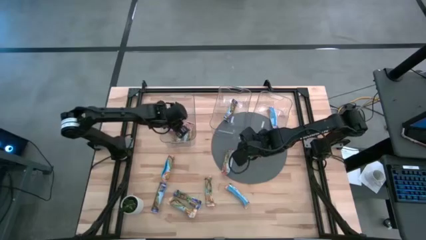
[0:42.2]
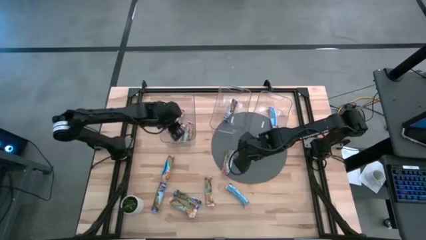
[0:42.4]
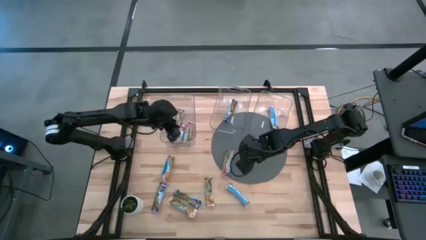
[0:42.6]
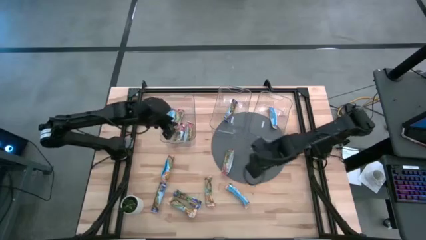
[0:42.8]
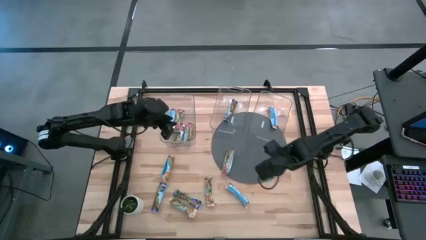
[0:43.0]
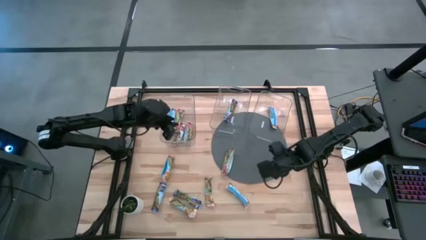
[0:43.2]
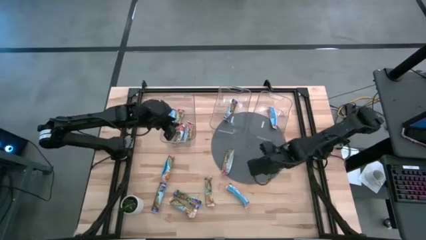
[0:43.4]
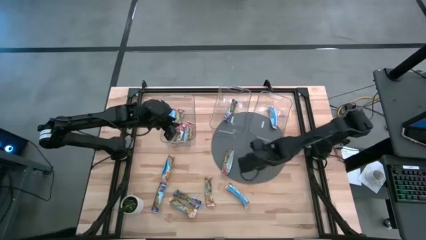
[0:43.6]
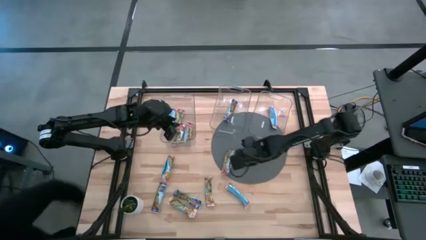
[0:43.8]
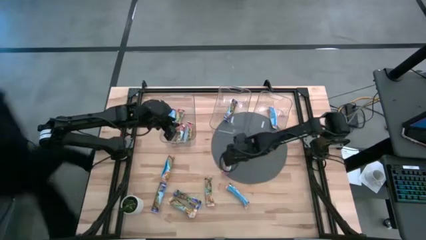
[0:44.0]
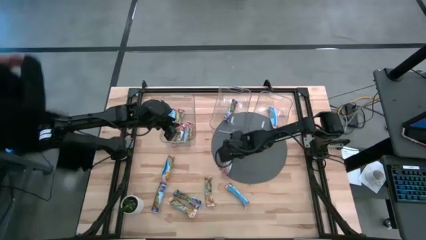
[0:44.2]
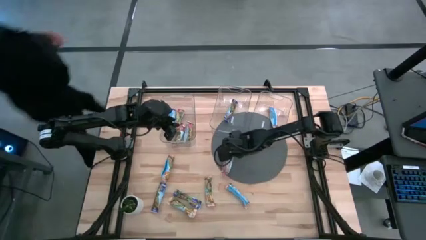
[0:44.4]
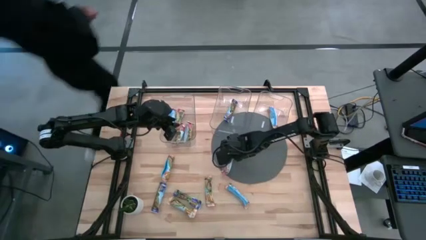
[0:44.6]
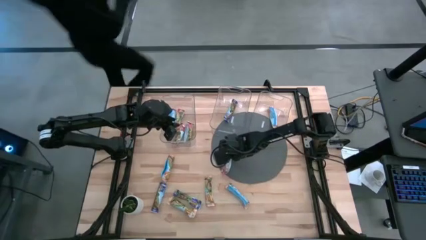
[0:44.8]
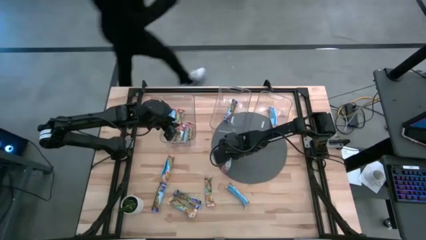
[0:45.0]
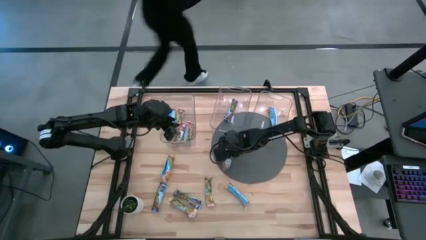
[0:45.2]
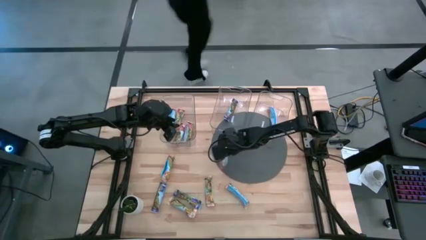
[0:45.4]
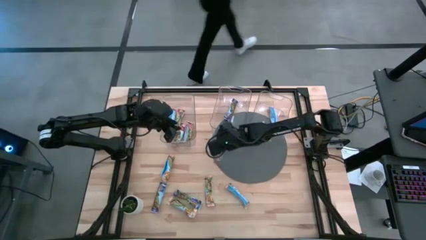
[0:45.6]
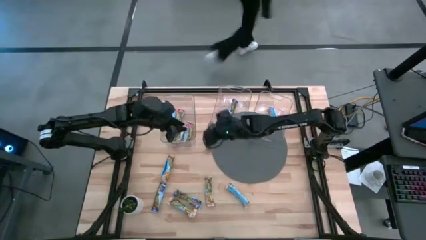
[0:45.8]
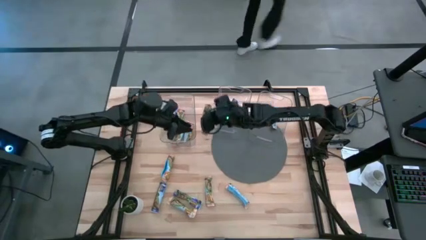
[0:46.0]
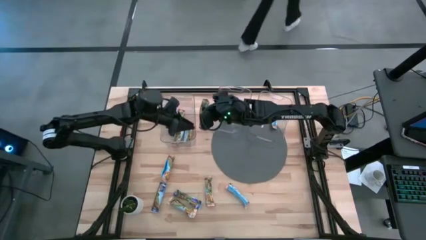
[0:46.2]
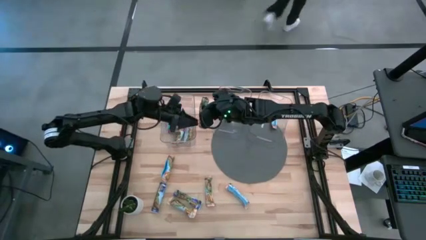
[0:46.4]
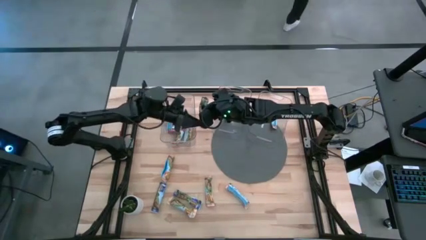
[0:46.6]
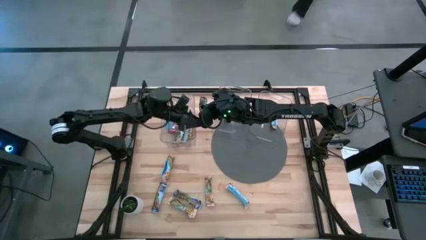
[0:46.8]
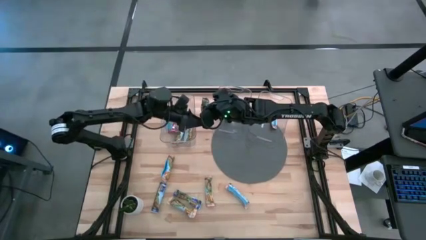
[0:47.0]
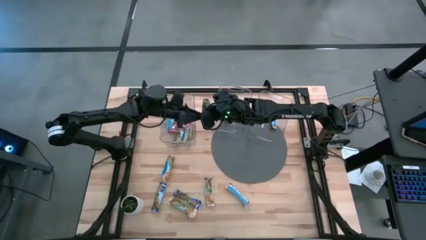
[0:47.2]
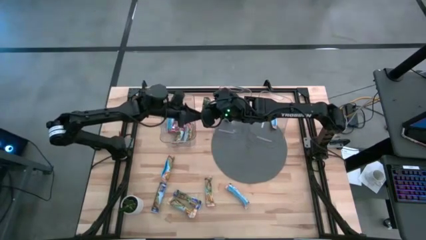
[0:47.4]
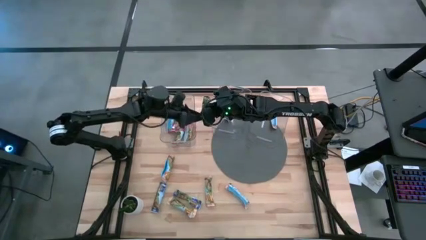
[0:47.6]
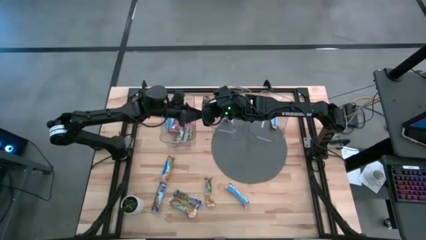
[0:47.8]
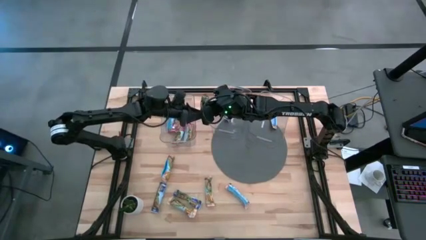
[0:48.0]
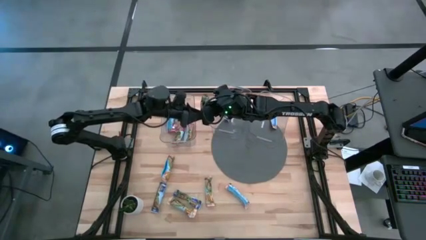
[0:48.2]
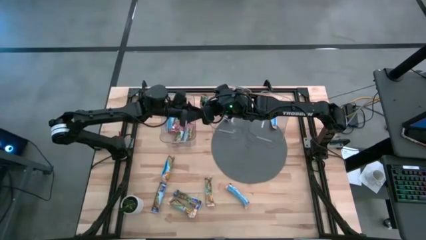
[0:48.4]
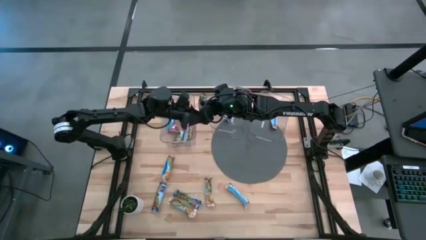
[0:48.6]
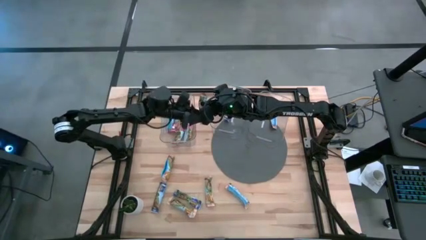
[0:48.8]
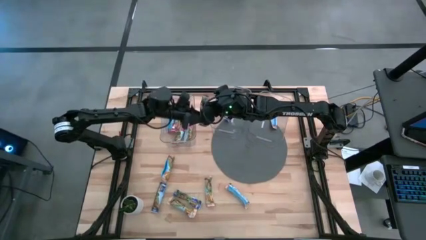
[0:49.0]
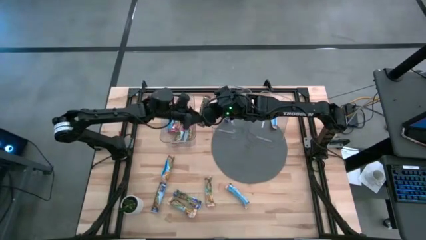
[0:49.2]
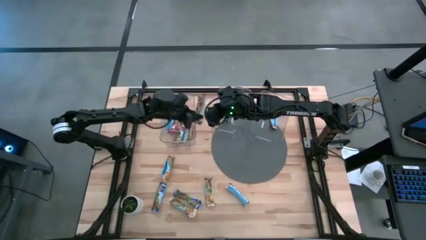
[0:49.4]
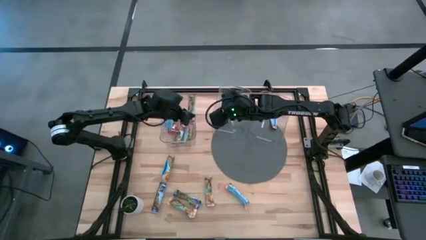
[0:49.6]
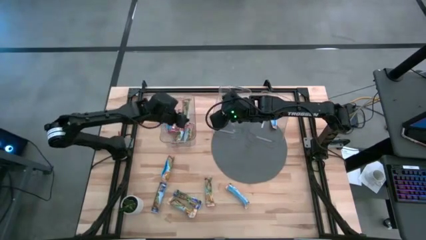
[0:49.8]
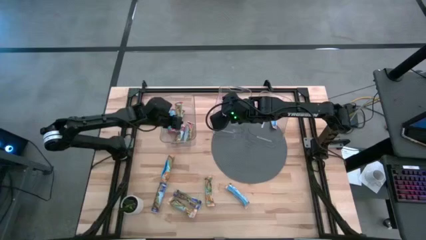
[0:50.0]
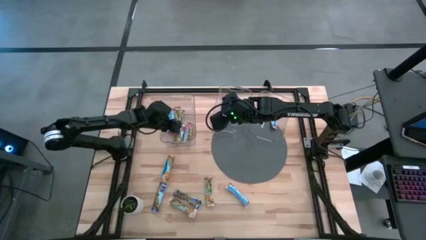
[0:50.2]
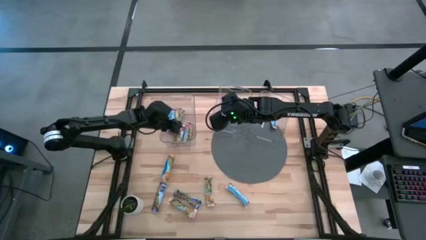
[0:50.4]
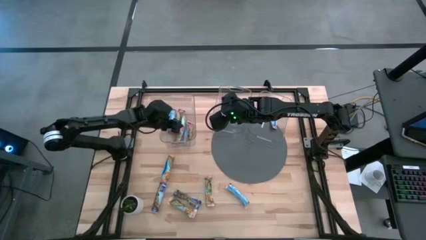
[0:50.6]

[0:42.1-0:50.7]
Task: Pick and place Granola Bars by type
Put the red granola bar into the left transparent bin

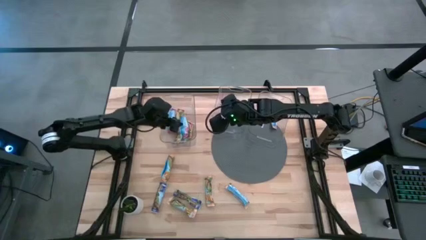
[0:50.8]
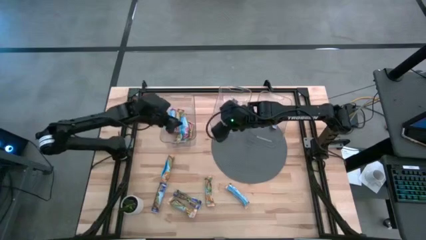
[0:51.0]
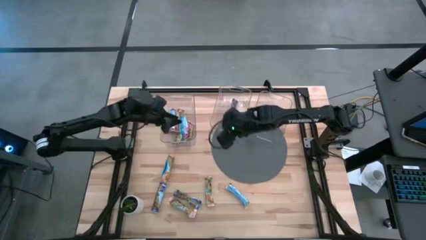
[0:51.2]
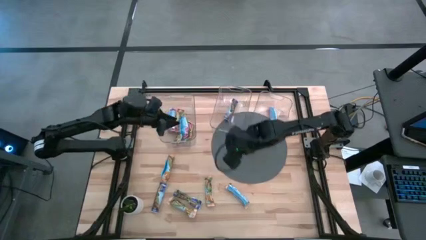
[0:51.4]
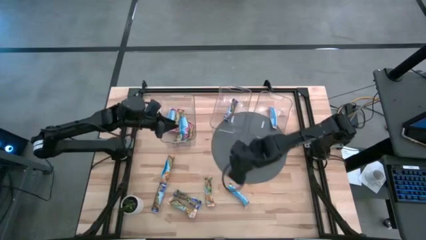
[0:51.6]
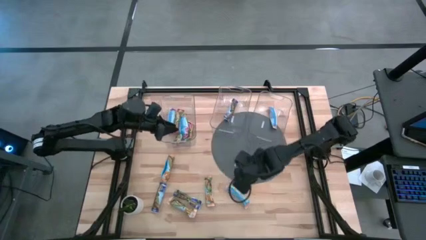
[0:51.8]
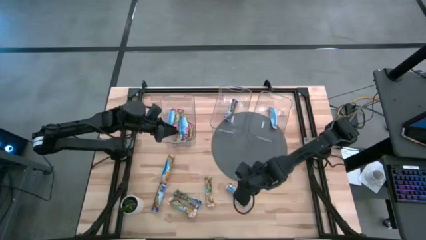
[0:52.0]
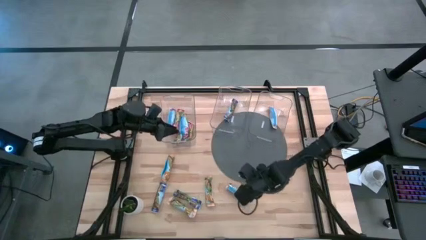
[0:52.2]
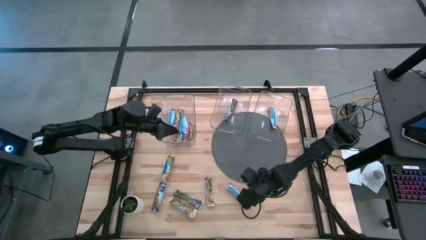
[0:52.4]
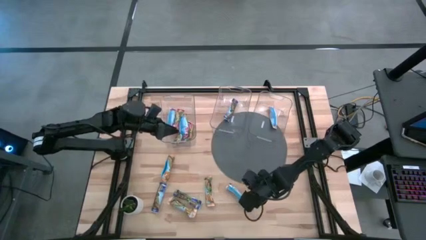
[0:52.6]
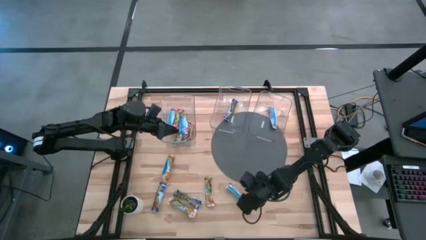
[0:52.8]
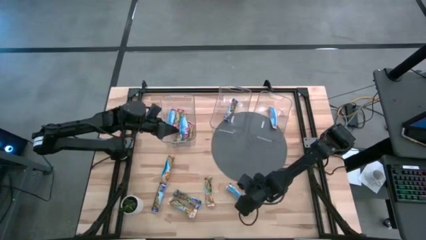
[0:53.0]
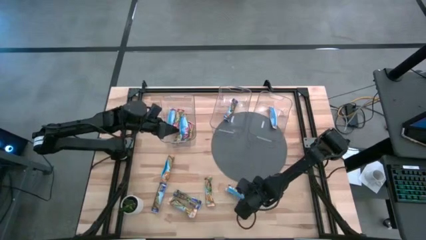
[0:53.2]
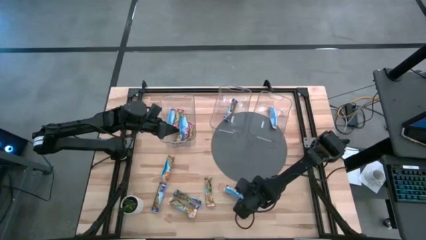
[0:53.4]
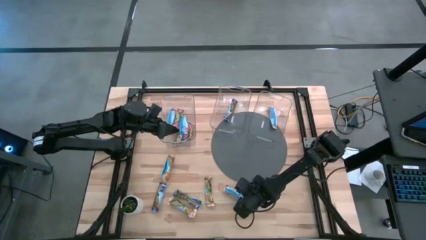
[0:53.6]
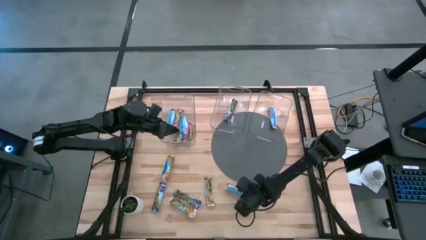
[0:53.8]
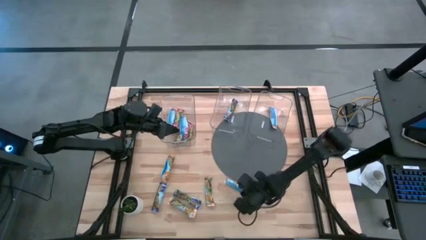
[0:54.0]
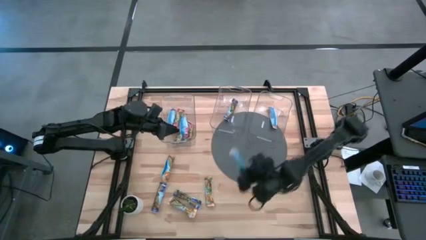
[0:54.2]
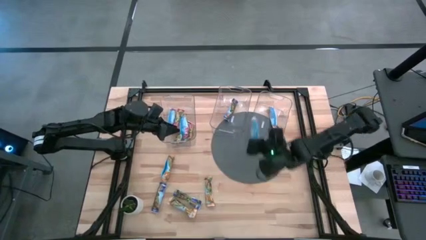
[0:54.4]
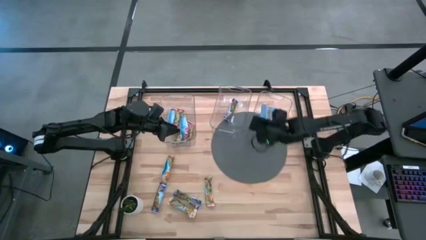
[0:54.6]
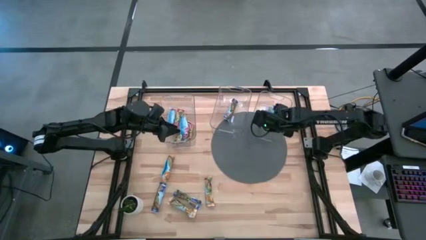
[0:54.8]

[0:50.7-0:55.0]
Put the yellow granola bar into the right transparent bin

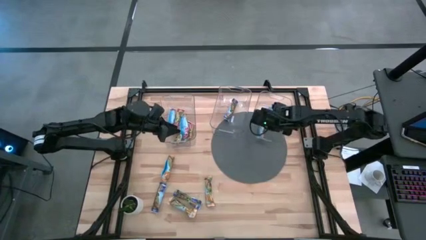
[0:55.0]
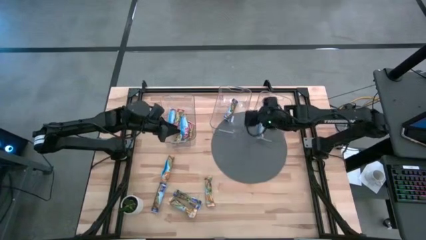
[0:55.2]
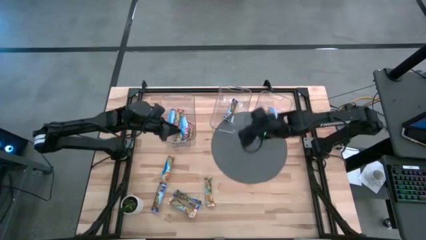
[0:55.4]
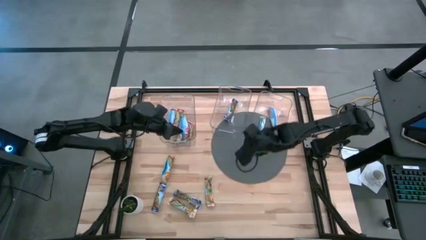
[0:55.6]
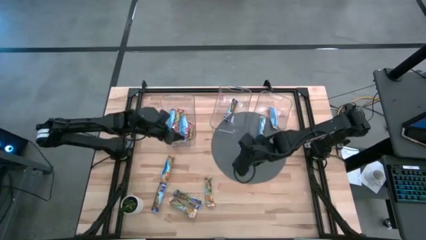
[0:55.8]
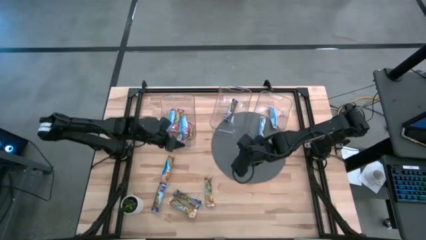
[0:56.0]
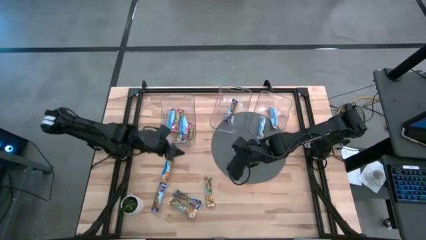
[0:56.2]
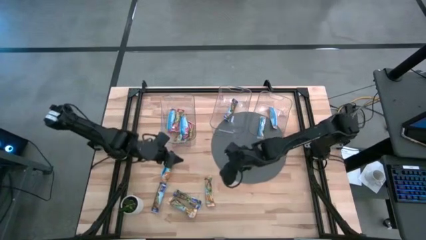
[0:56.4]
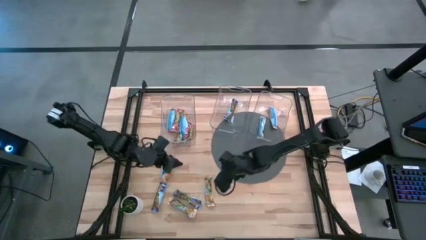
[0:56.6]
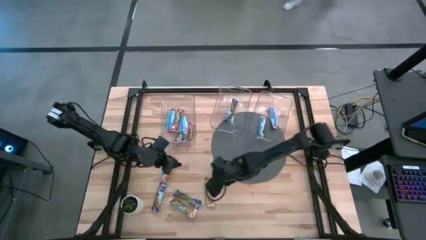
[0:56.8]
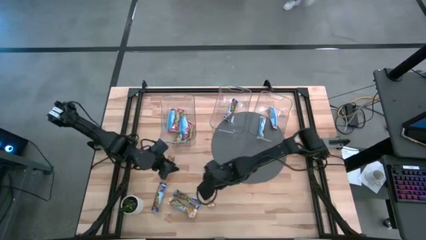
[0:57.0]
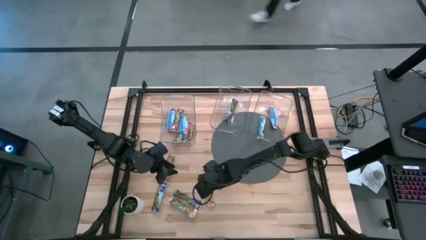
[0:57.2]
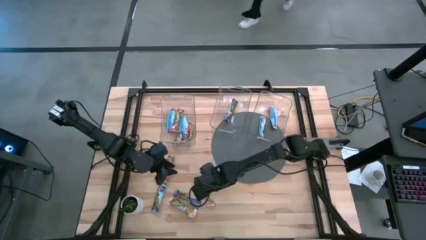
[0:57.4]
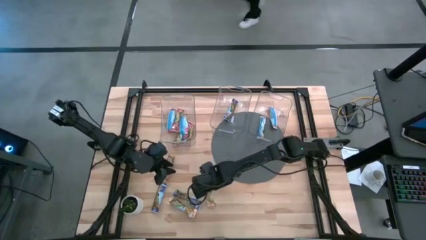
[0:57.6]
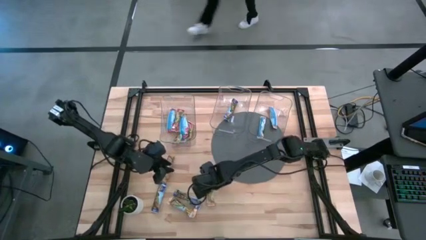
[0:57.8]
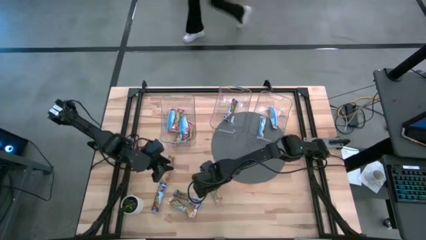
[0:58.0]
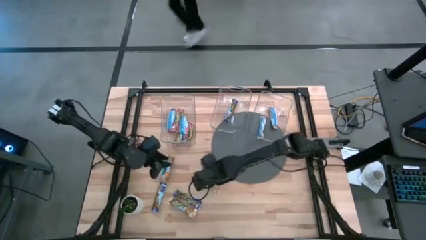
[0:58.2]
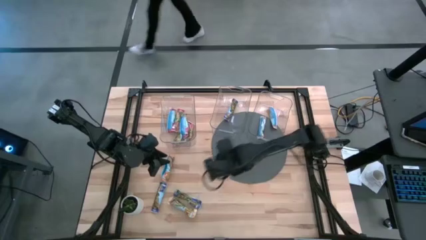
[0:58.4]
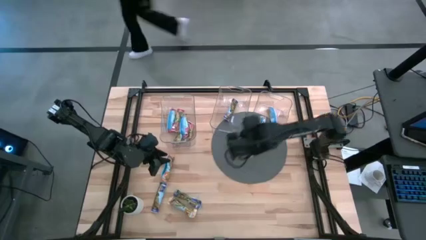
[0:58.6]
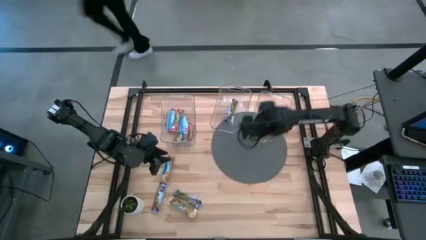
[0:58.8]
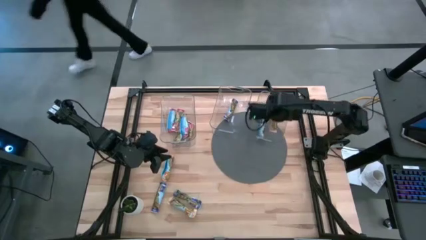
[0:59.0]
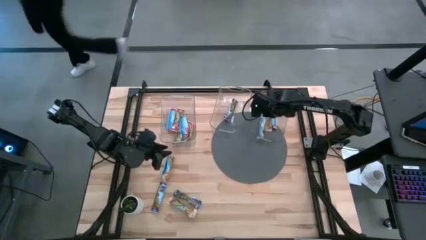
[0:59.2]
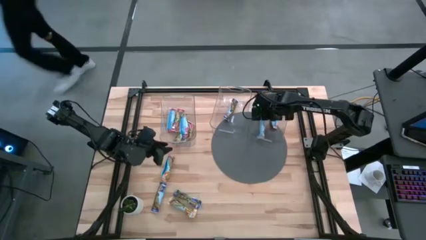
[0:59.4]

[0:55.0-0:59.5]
Put the yellow granola bar into the right transparent bin
